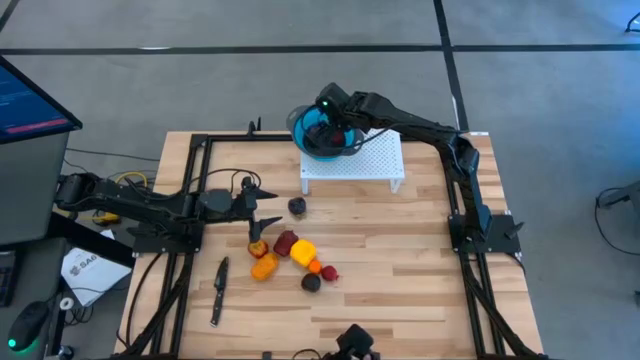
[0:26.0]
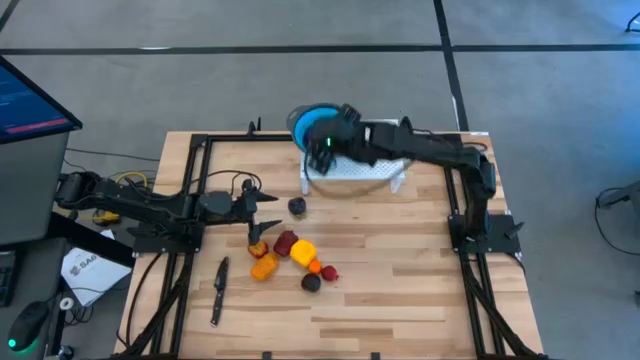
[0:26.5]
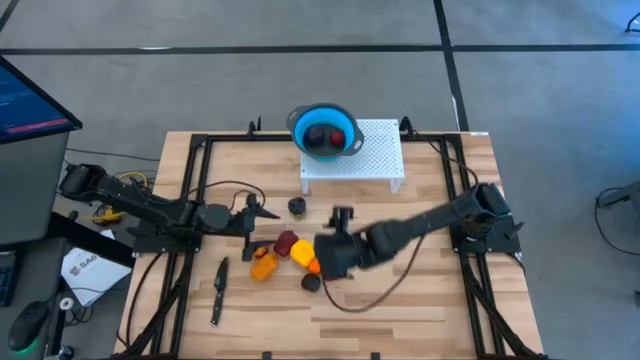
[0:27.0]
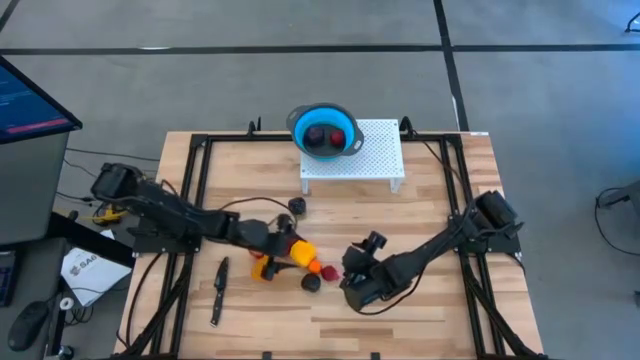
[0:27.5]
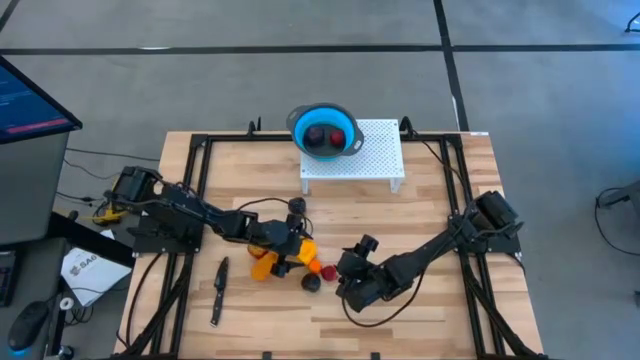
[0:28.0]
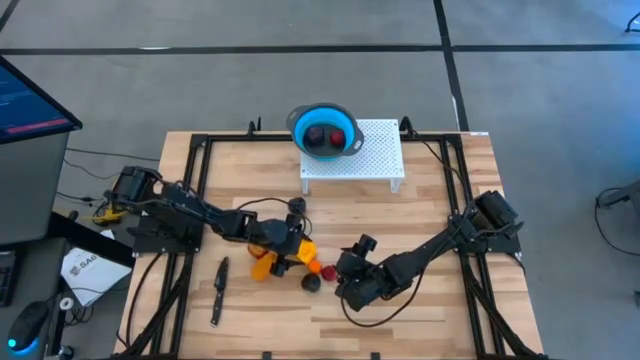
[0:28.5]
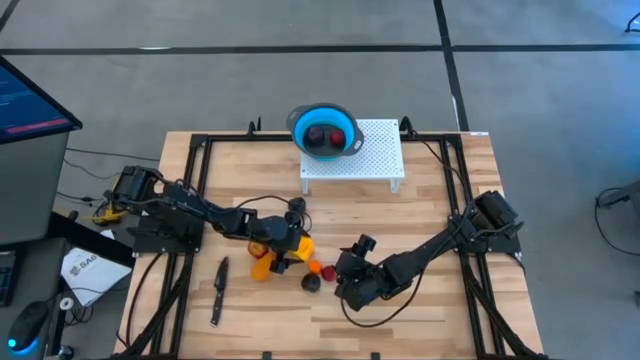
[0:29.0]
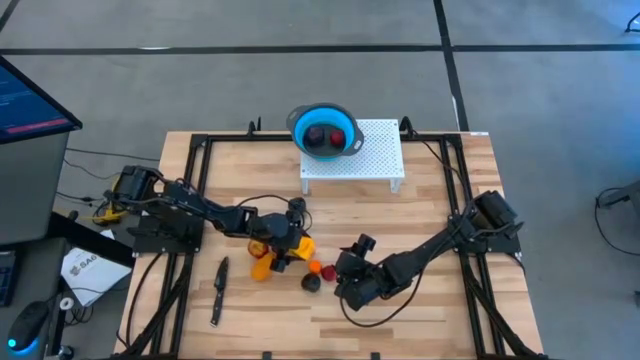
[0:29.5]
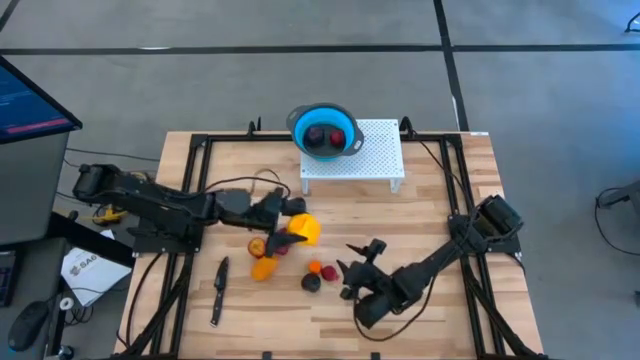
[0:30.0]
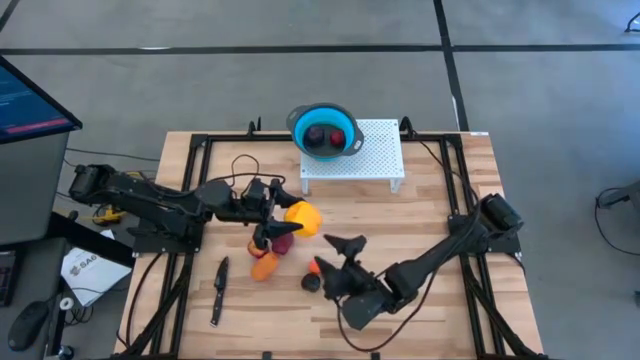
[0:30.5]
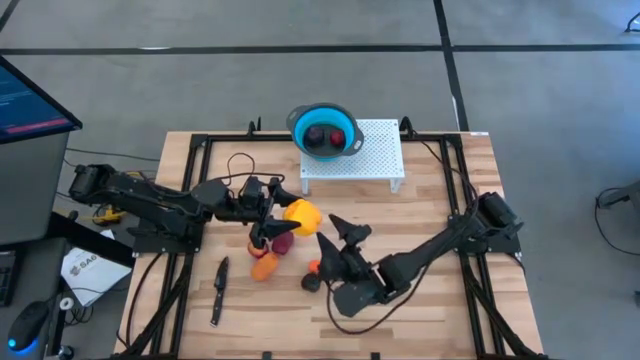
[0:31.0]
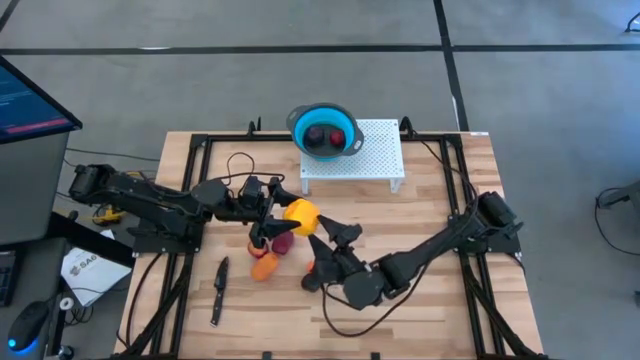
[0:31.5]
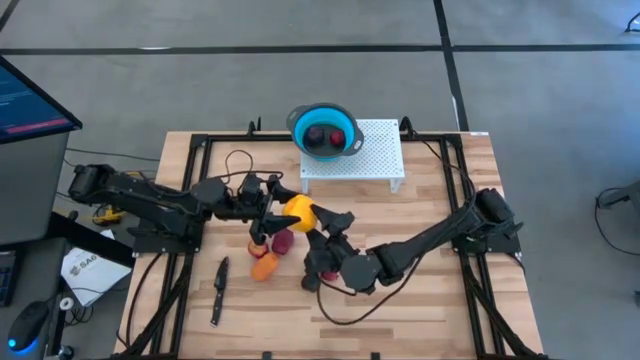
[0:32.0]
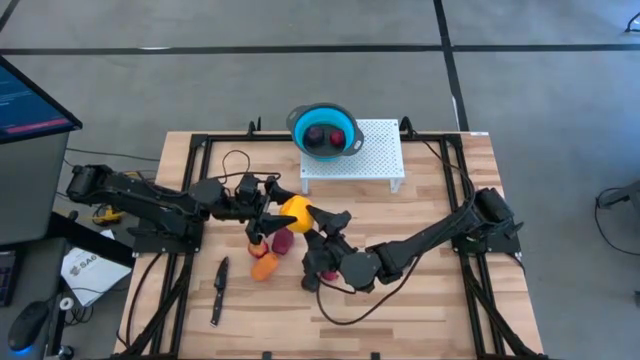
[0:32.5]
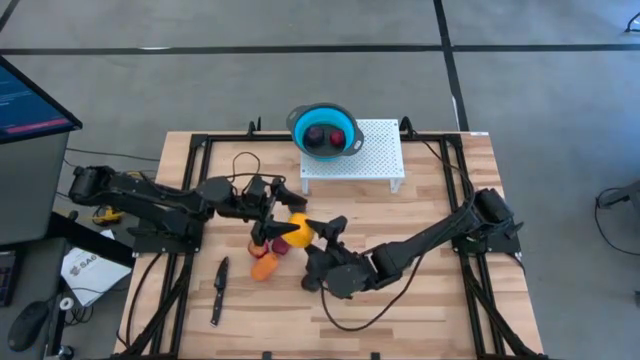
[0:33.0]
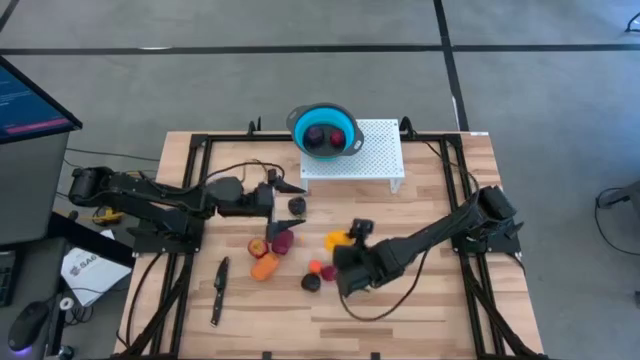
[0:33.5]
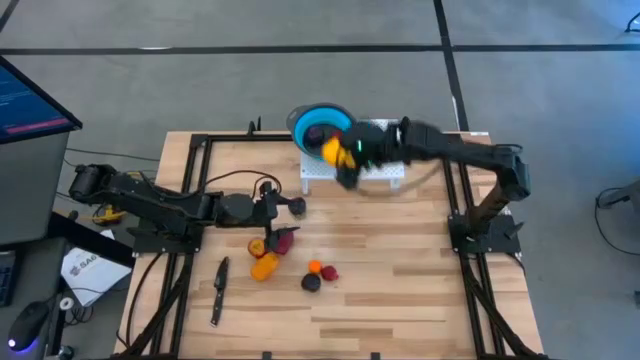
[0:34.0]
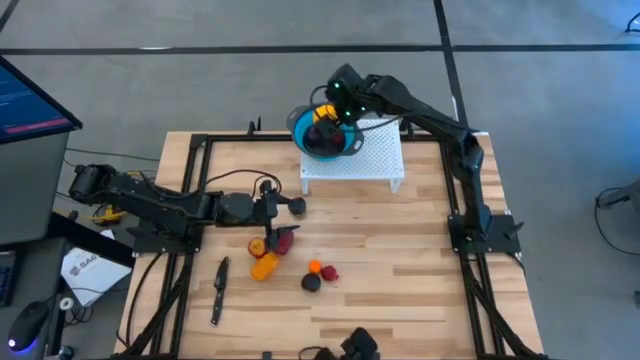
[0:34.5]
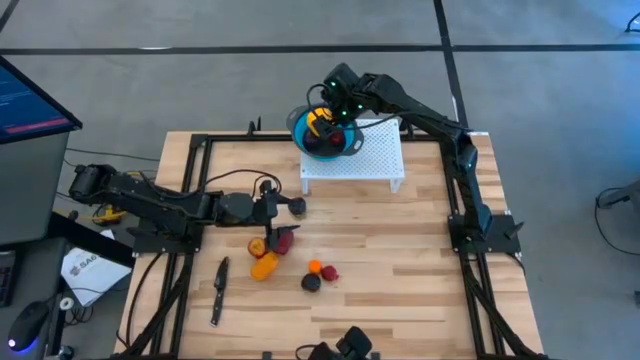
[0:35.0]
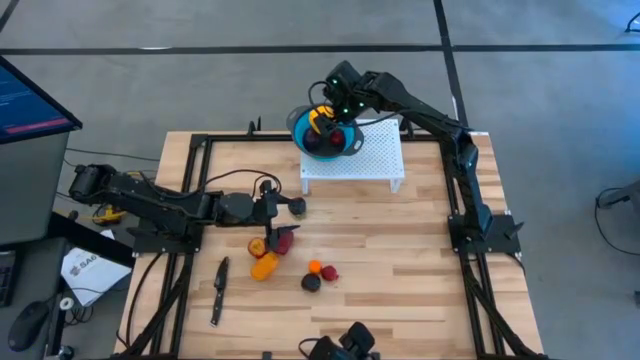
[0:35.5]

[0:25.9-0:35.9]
Task: Pick & Place Fruit
Put the yellow bell pepper into the blue strainer bowl on the shelf

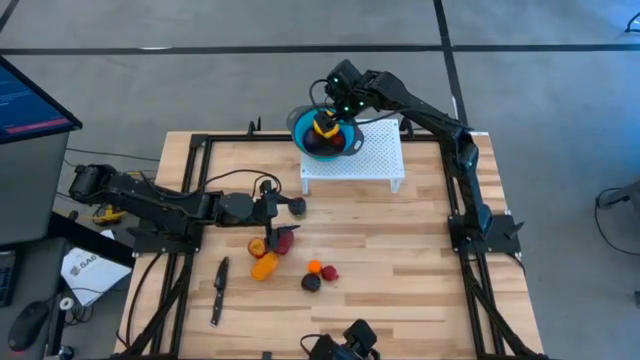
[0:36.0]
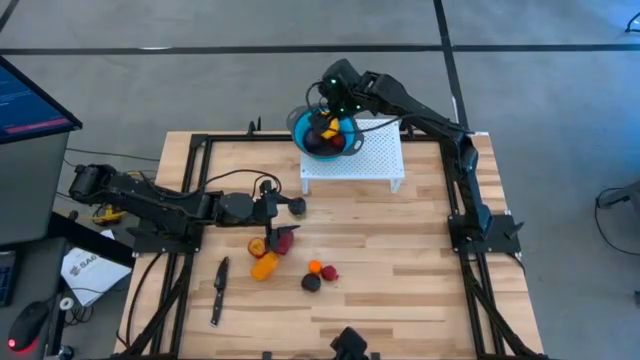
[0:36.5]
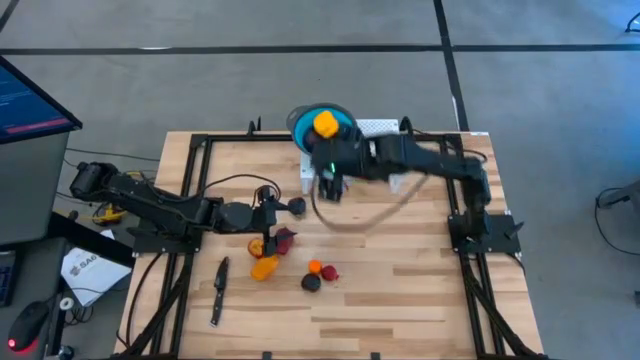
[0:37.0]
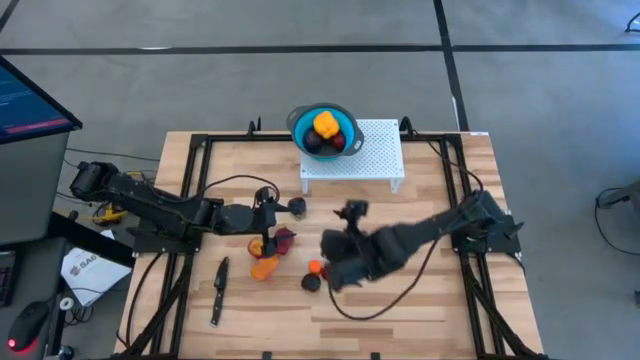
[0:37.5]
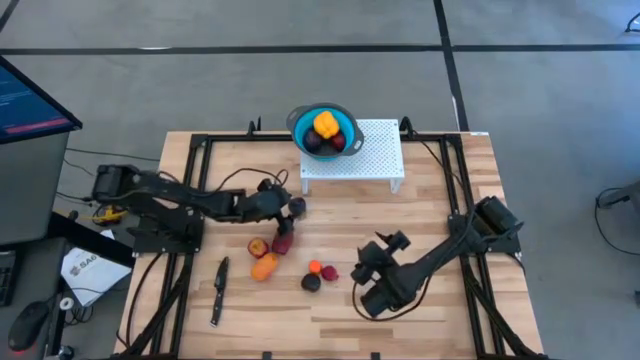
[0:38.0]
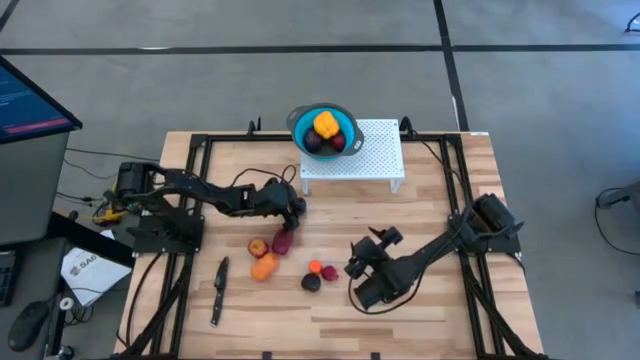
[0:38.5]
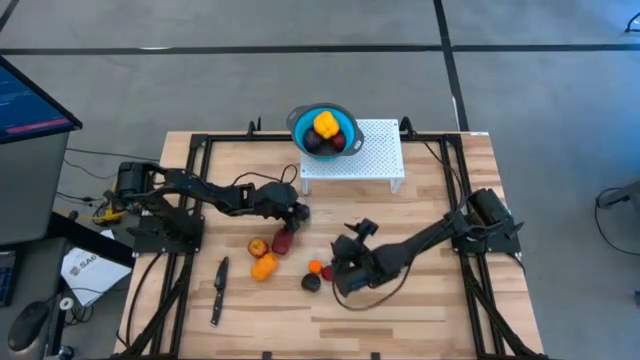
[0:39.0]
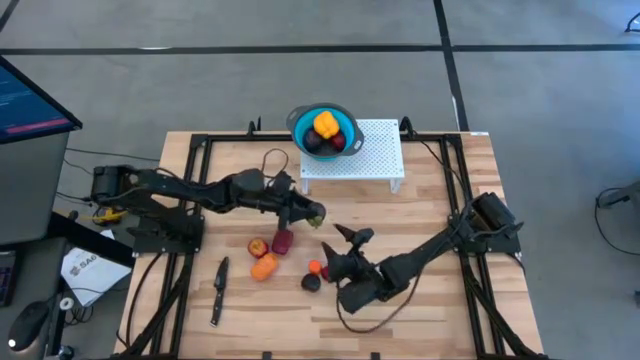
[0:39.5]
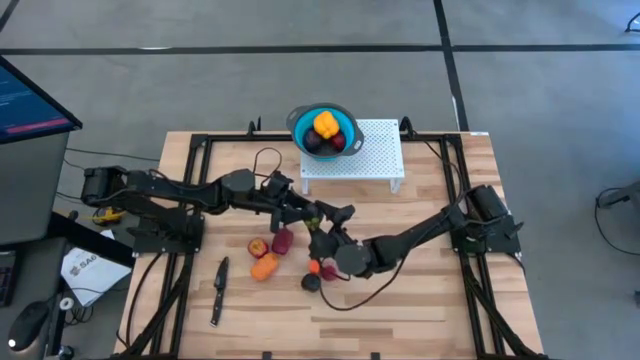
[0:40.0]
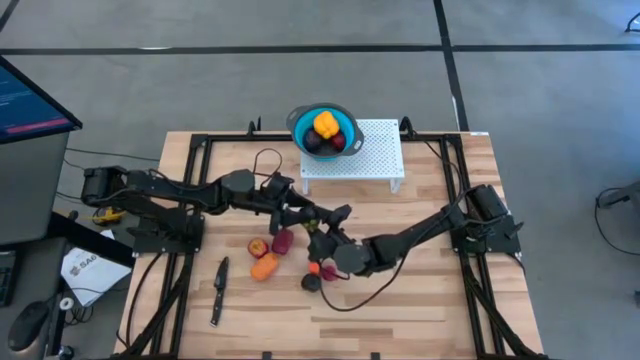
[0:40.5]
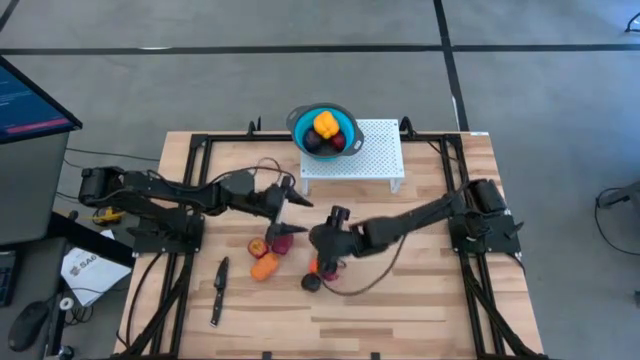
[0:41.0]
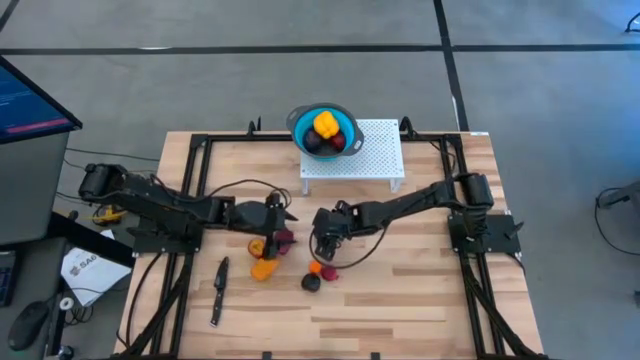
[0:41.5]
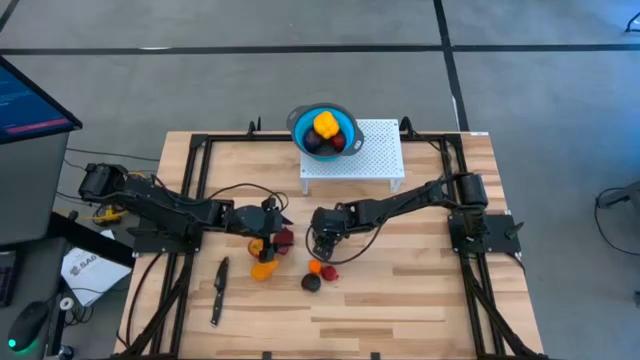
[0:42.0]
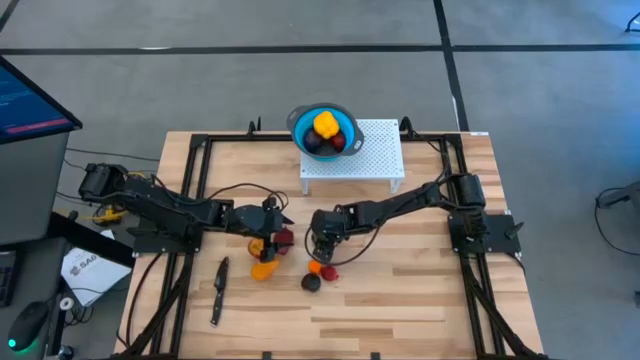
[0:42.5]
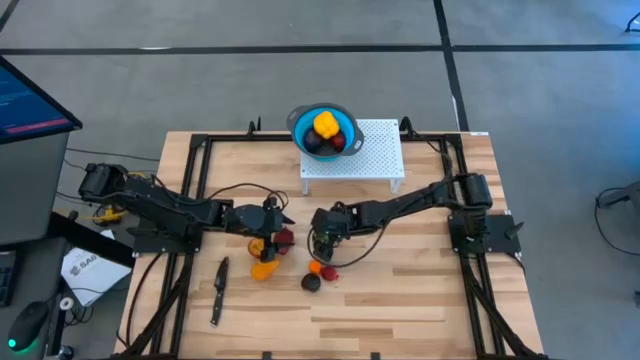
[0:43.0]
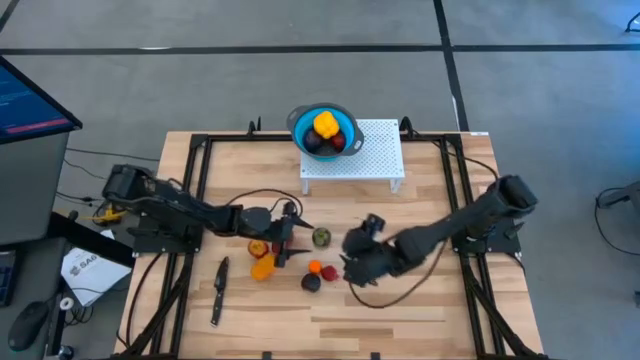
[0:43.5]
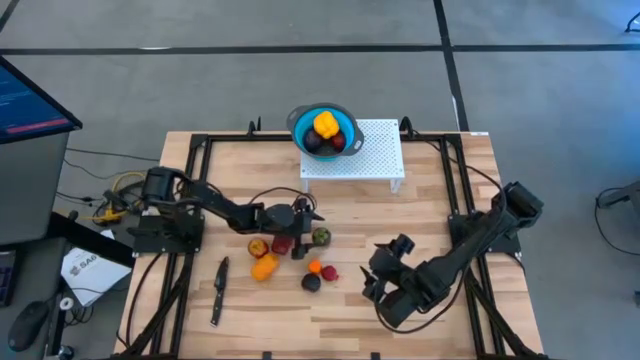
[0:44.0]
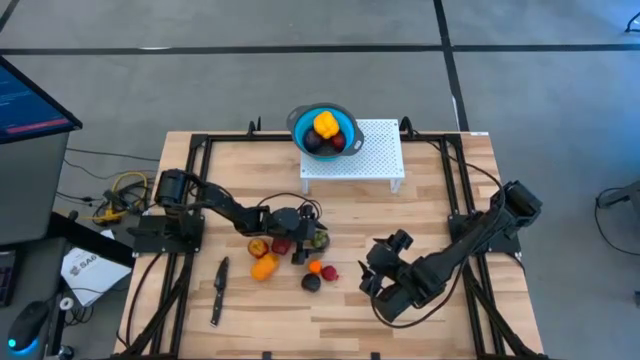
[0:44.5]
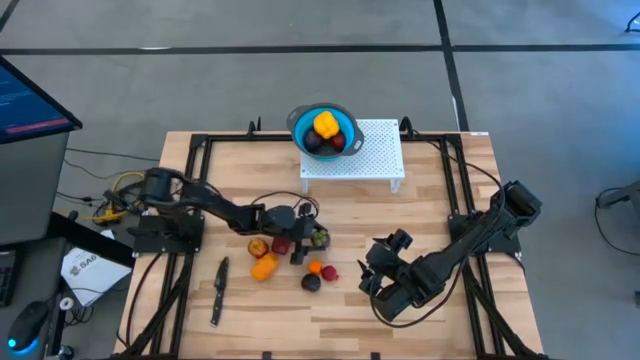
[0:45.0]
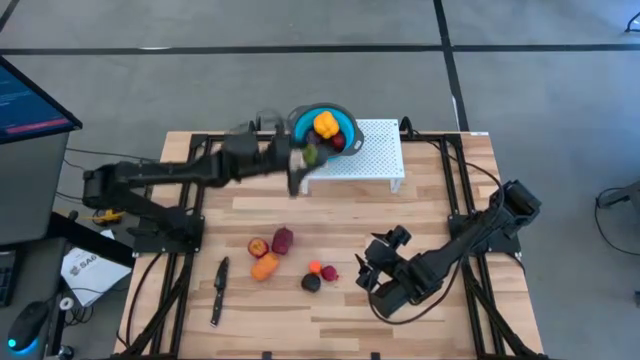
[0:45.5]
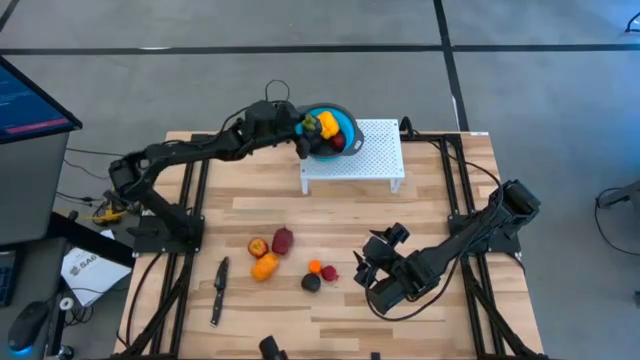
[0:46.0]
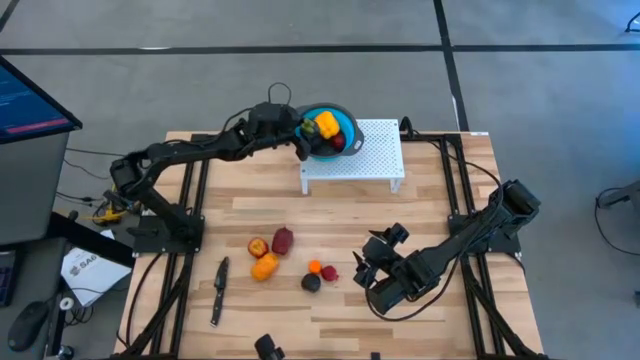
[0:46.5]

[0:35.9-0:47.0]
Put the top purple plum into the blue strainer bowl on the shelf
